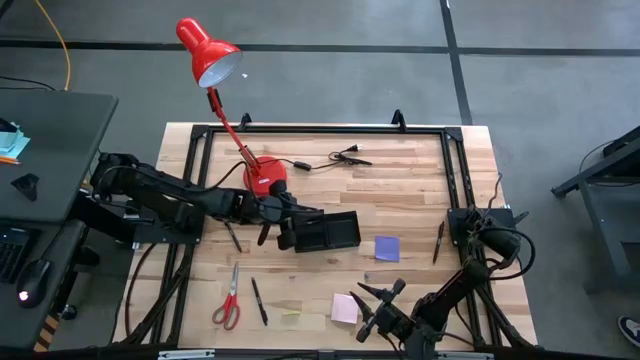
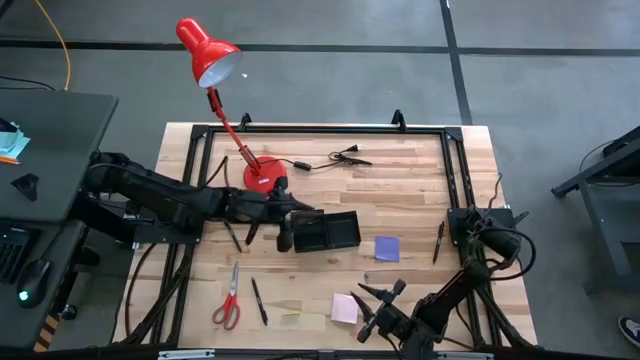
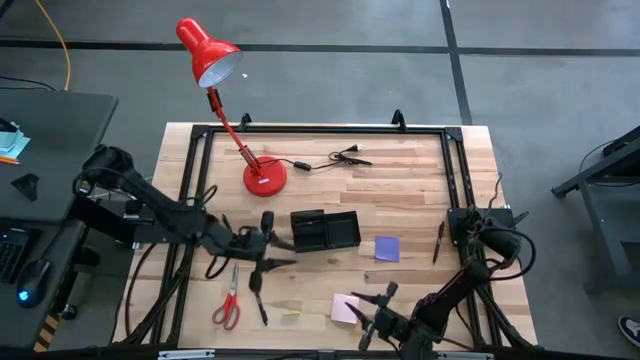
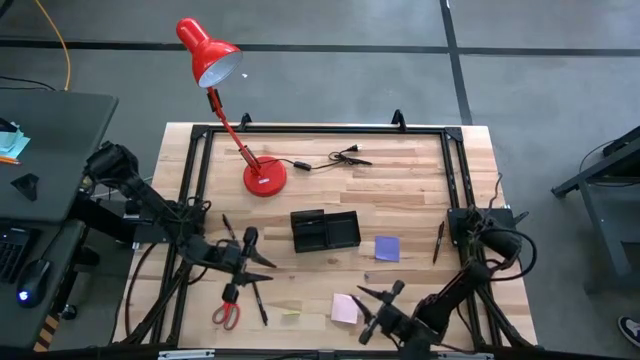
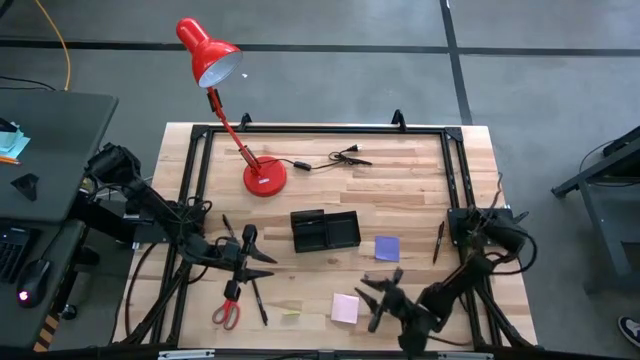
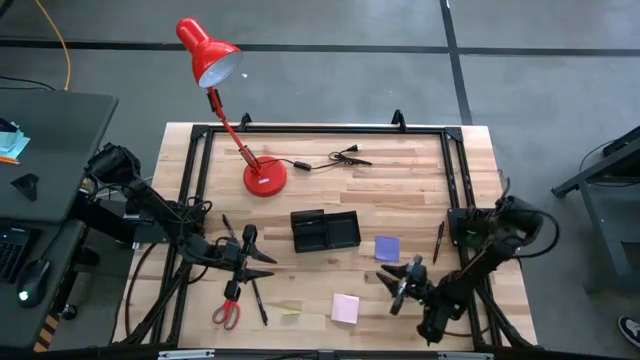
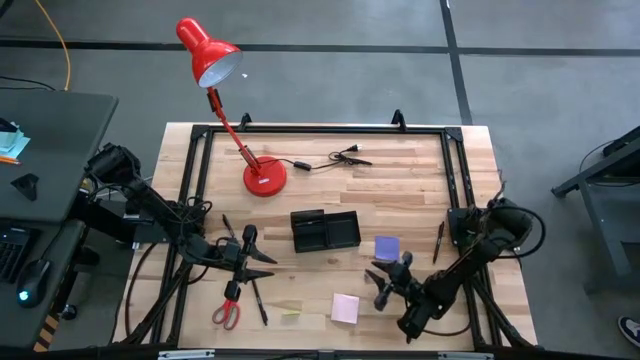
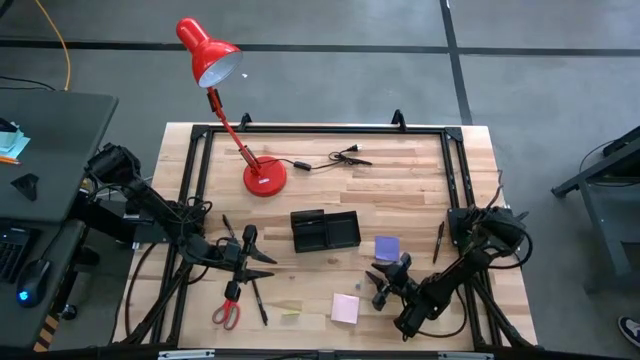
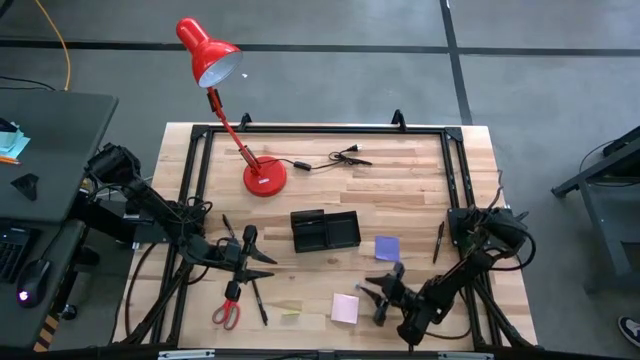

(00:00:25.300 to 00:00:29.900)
Task: Pick and place office supplies into organizer
Put the blue binder clip into the black desk organizer

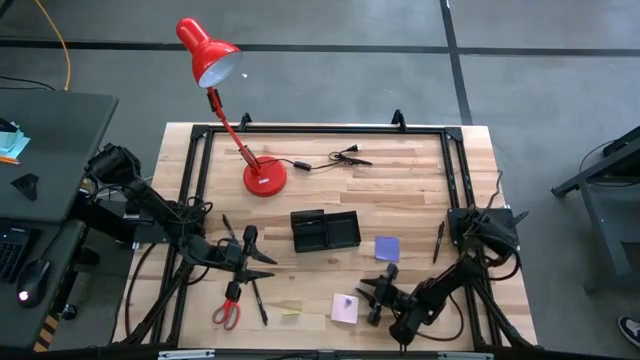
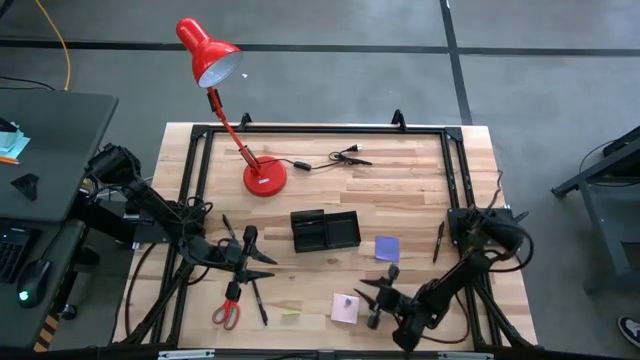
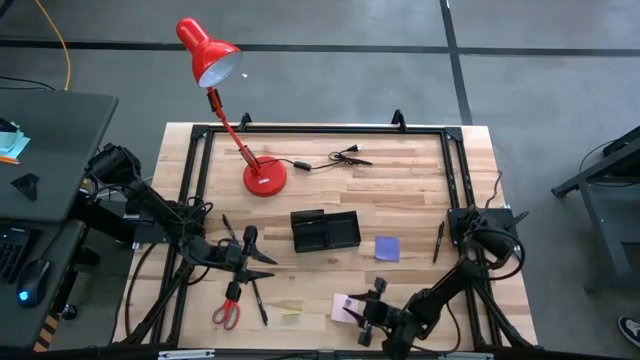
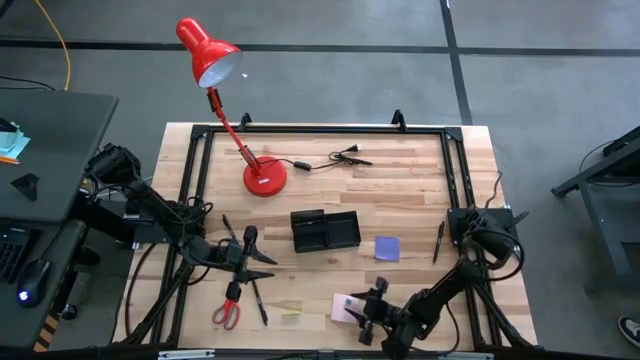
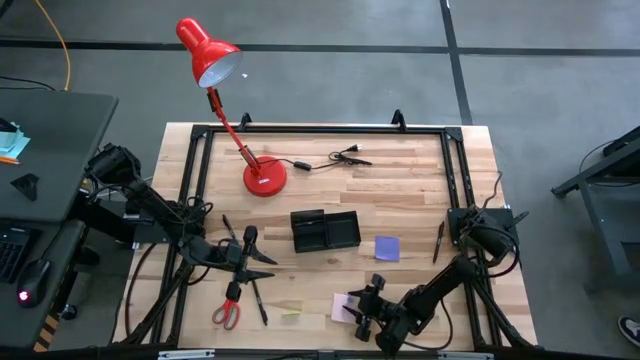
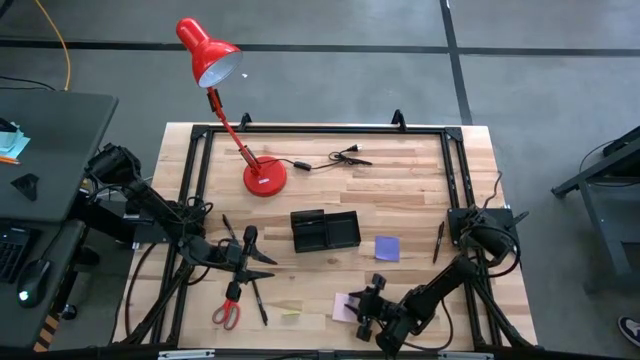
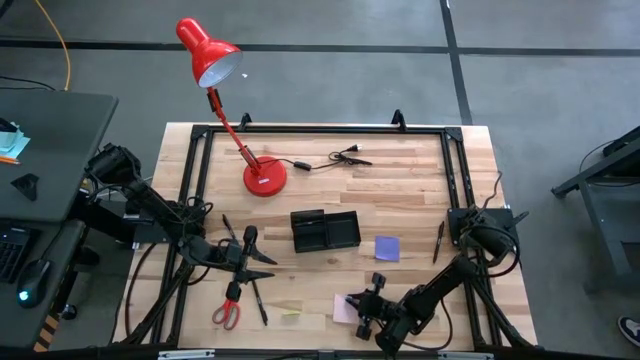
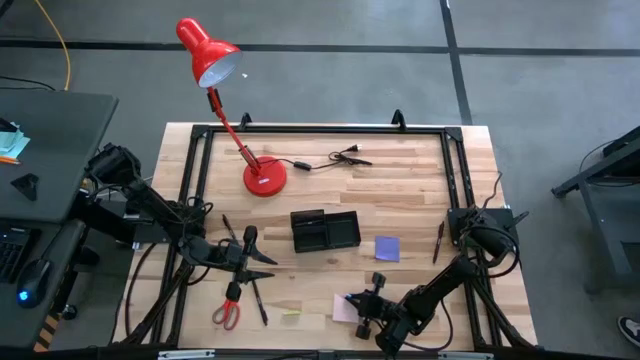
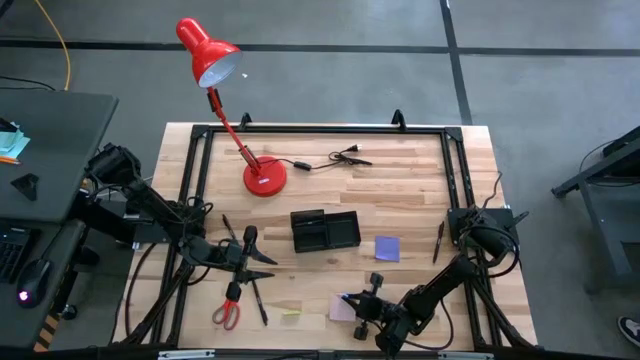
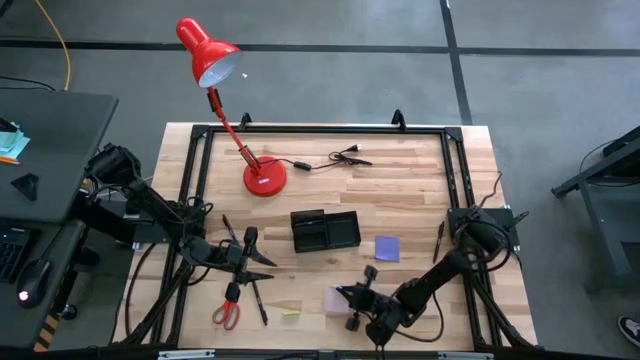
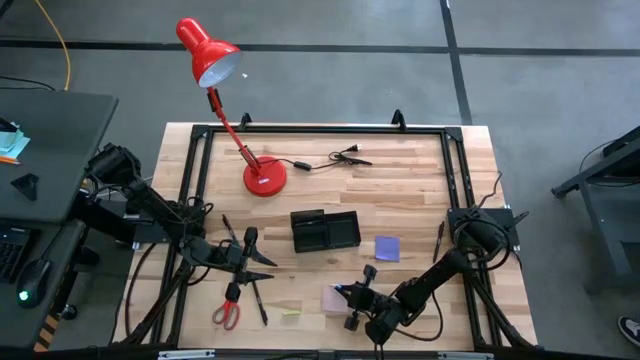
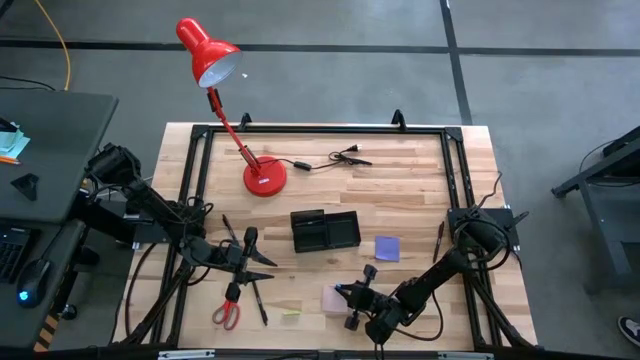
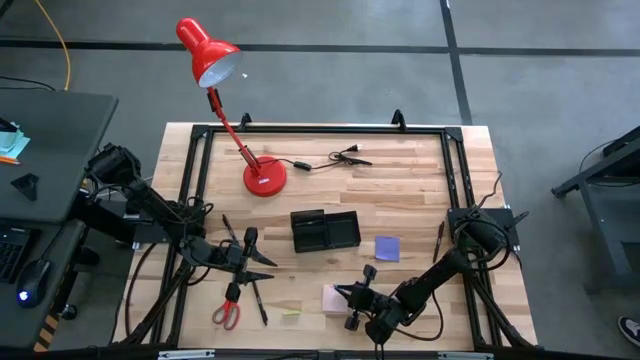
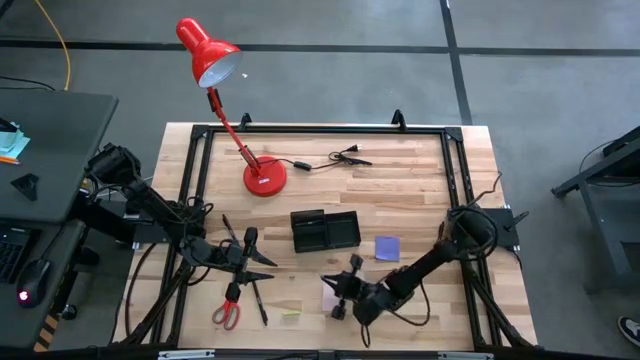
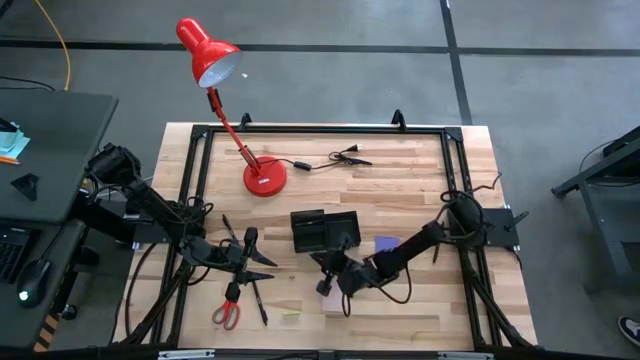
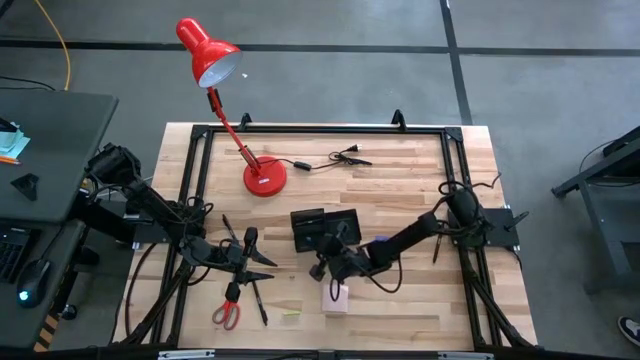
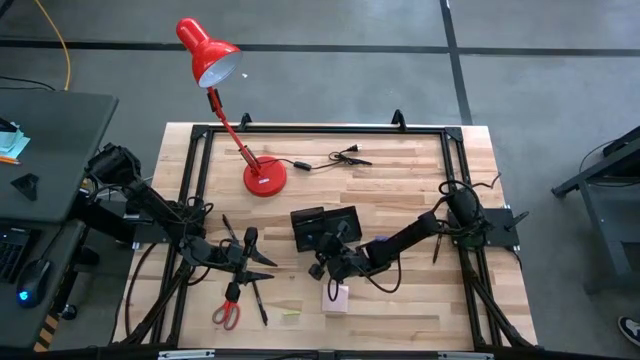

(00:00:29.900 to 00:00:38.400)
Put the blue binder clip into the black desk organizer

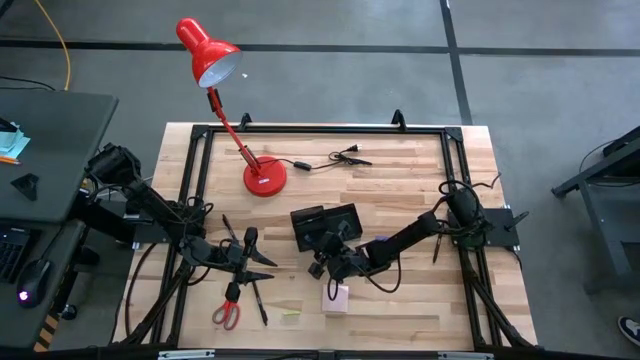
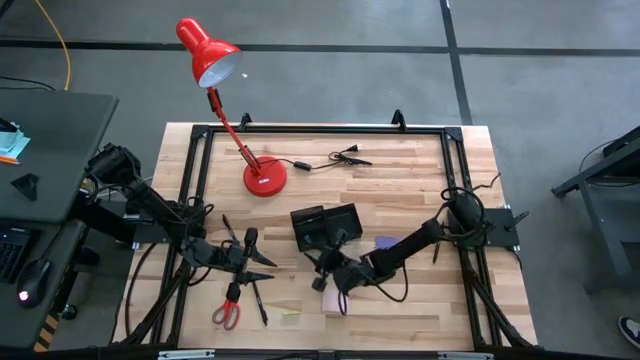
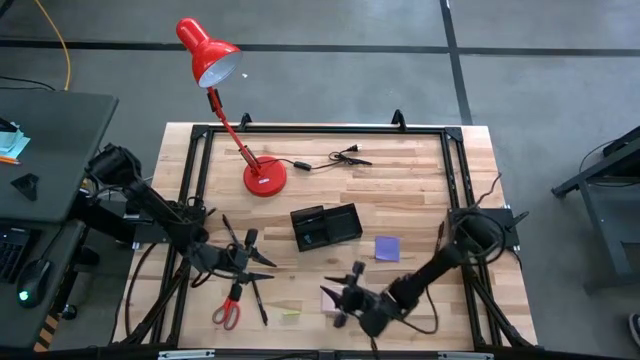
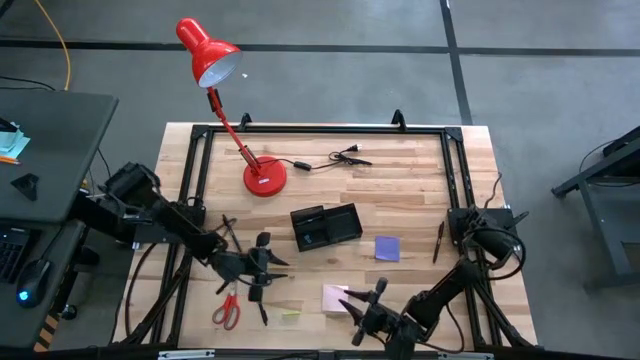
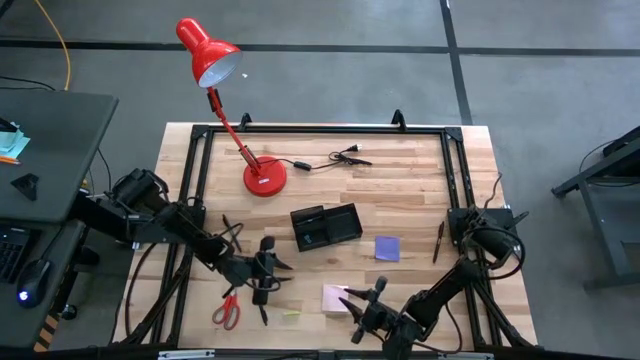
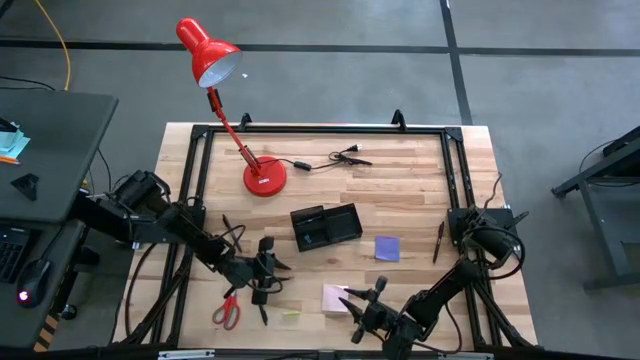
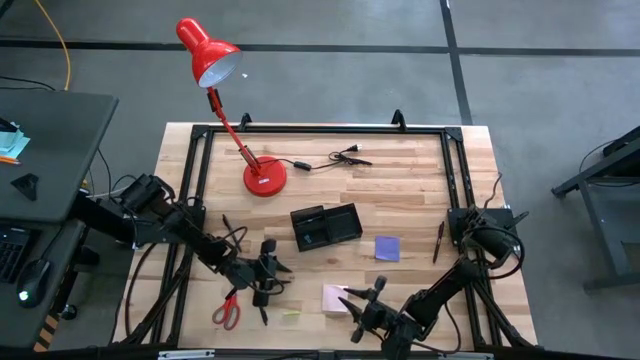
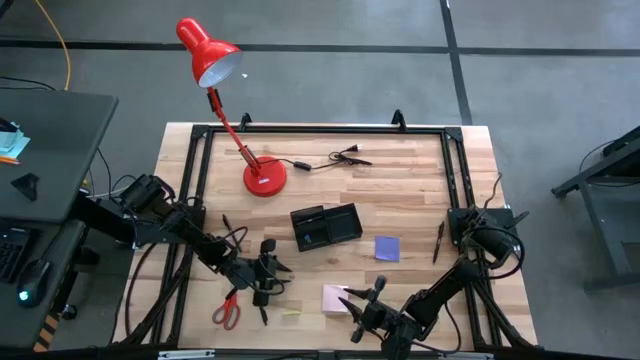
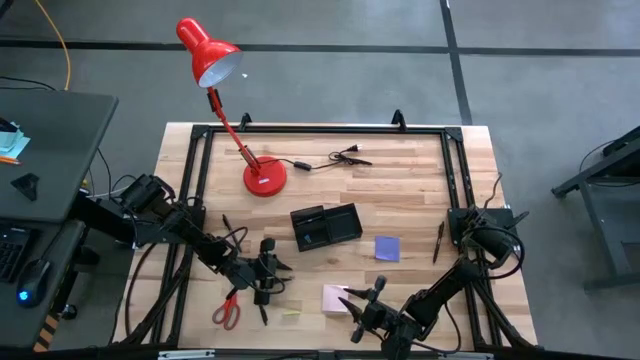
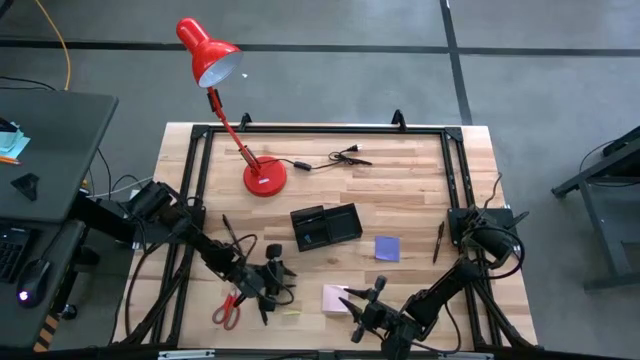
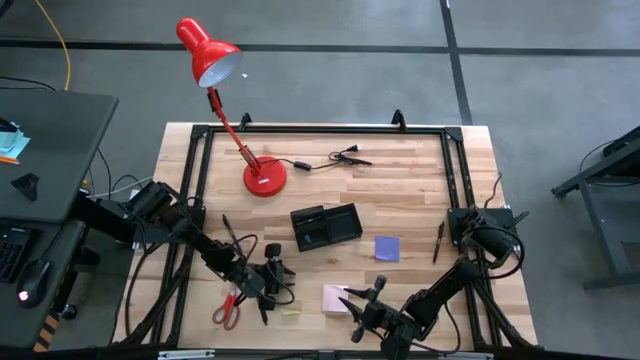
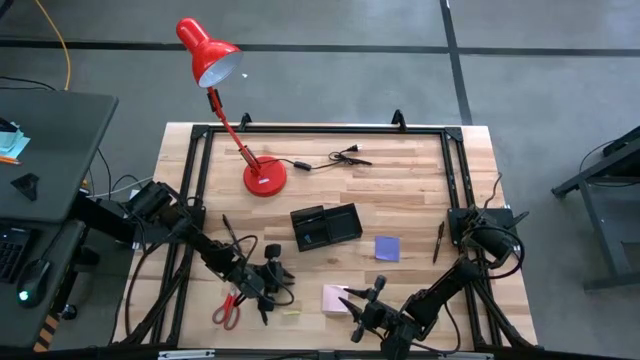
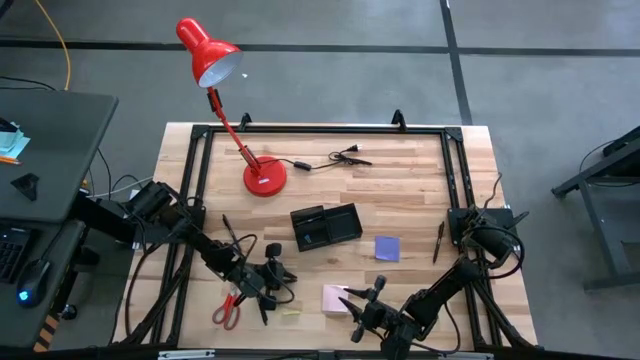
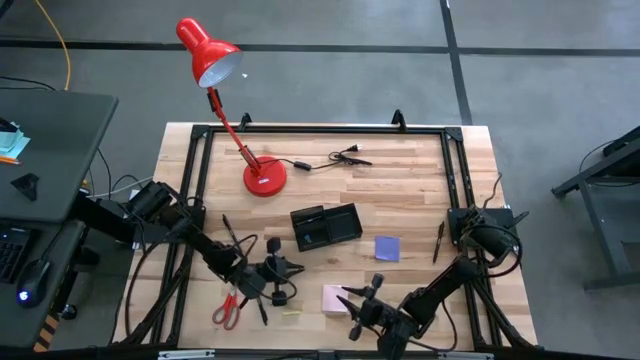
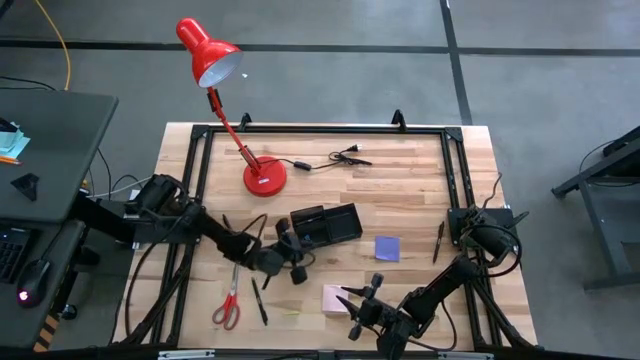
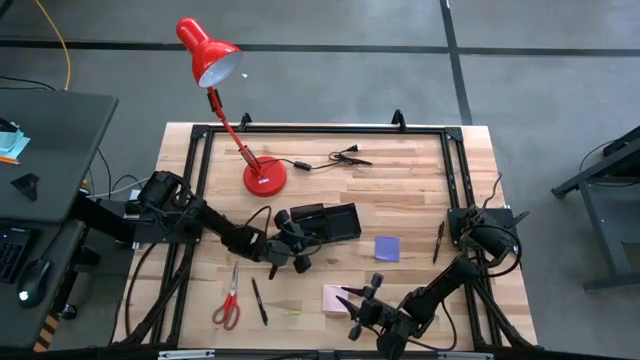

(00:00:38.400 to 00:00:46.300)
Put the pink binder clip into the black desk organizer
